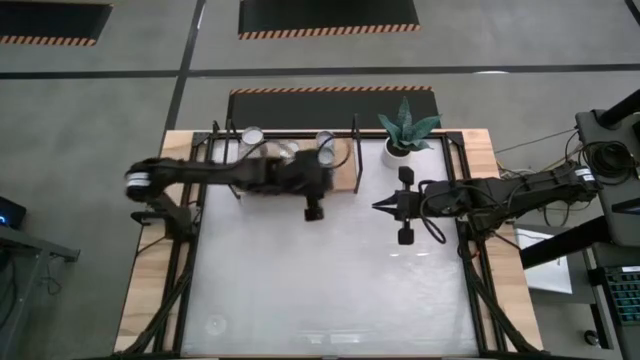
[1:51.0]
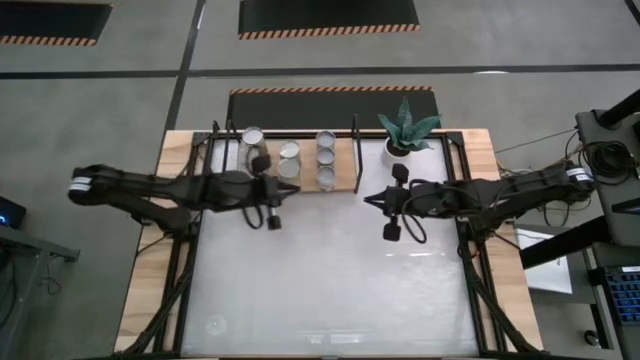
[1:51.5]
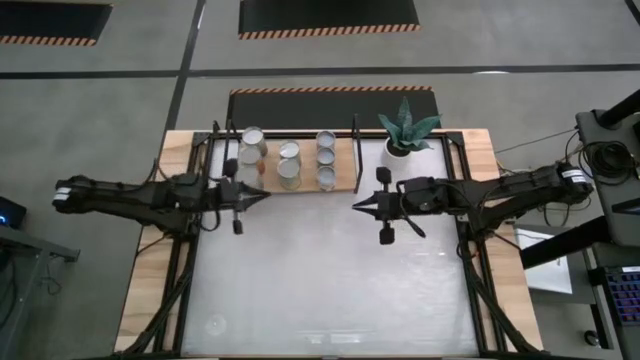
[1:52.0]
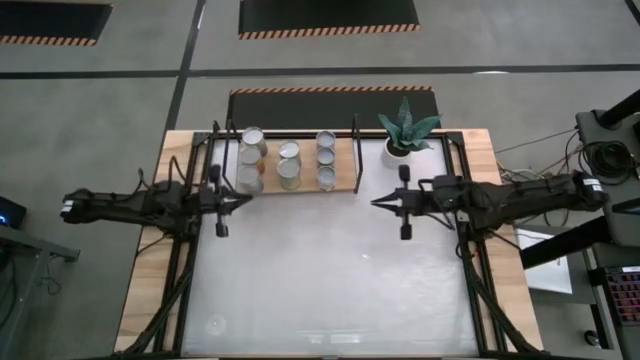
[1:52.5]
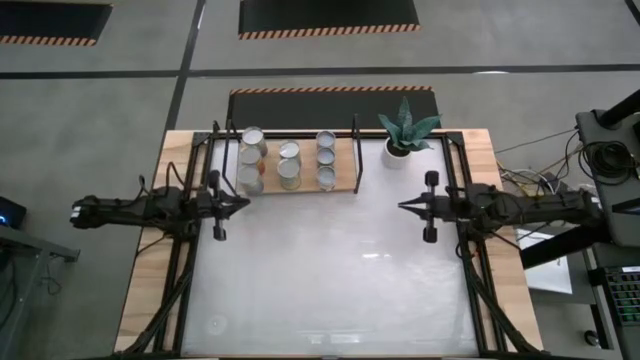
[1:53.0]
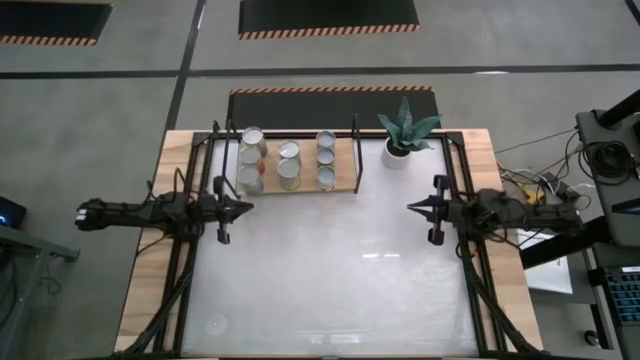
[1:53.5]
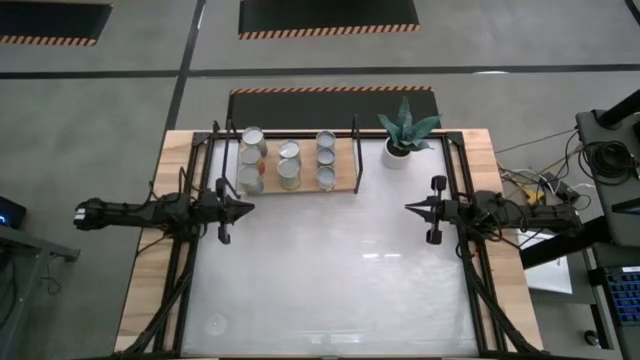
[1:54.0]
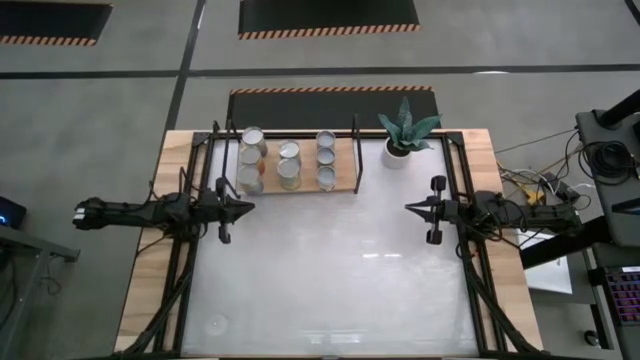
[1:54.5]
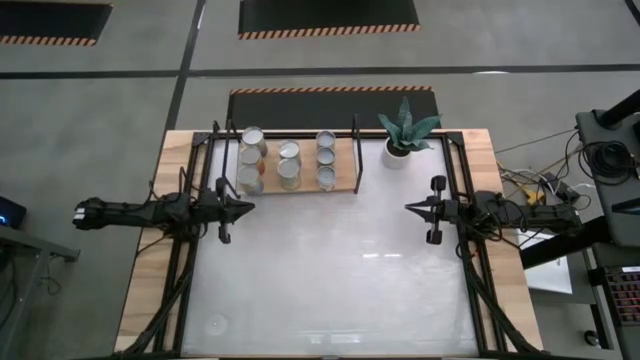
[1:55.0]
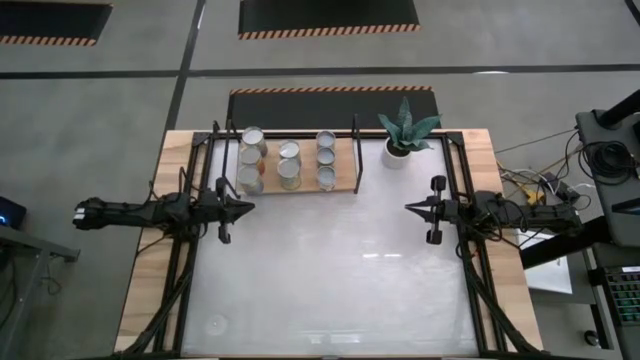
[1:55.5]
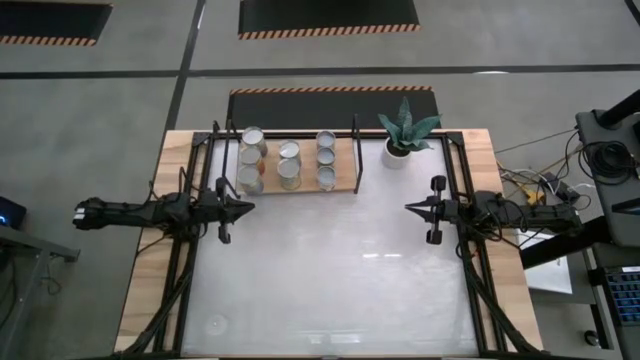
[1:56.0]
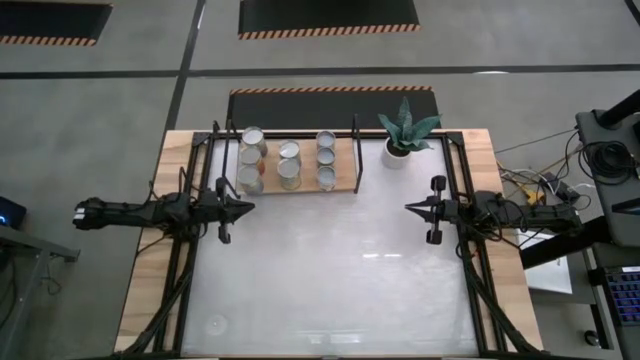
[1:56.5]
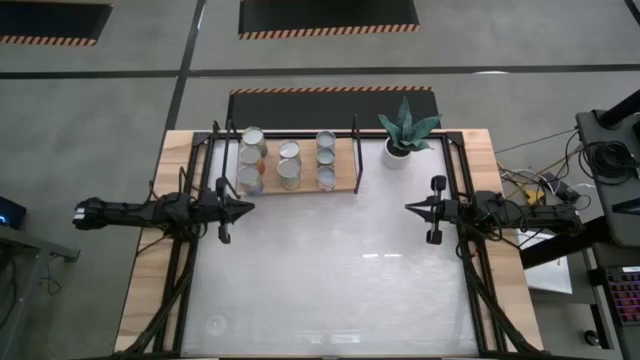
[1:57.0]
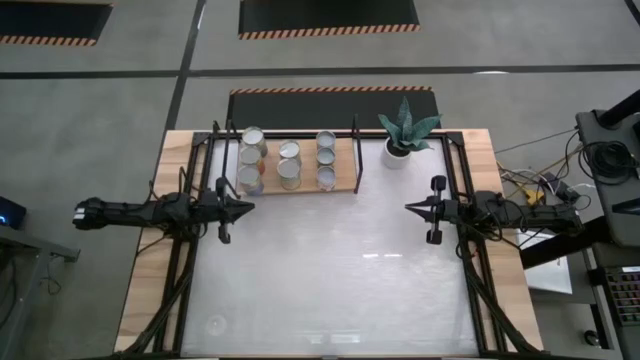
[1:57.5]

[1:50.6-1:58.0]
Task: Pick and place cans onto a shelf
Return to Home Position

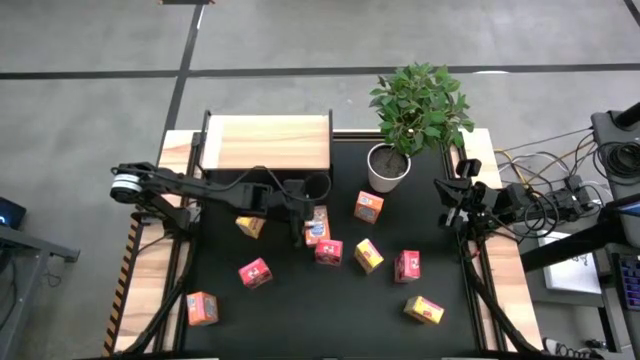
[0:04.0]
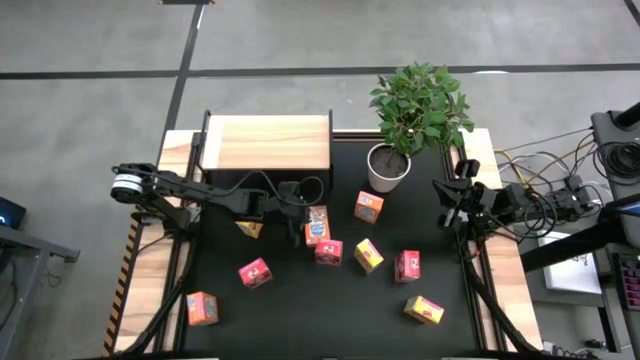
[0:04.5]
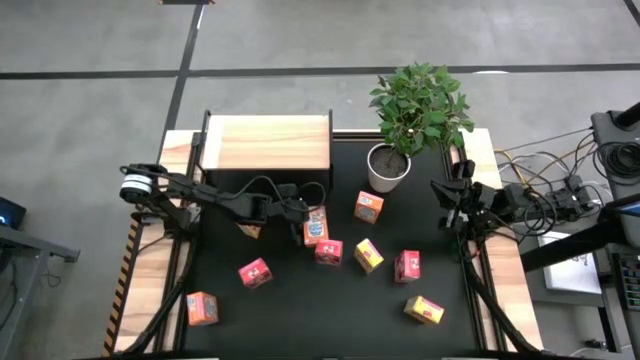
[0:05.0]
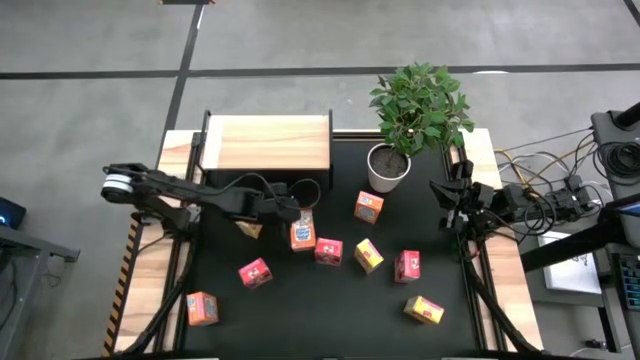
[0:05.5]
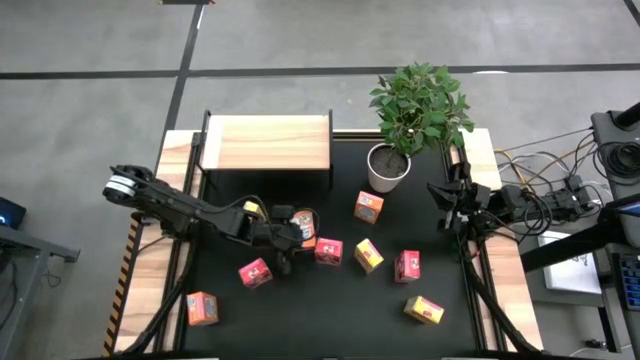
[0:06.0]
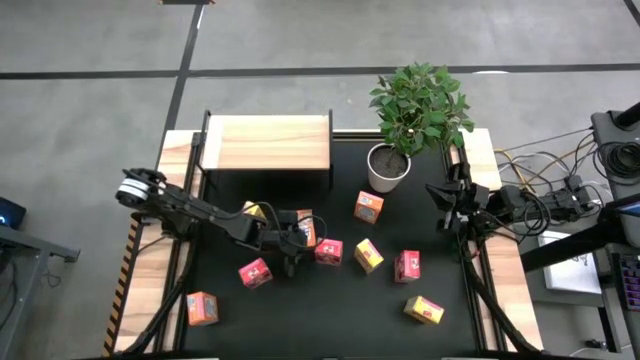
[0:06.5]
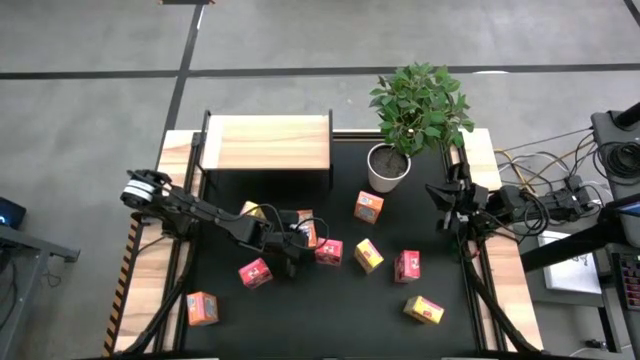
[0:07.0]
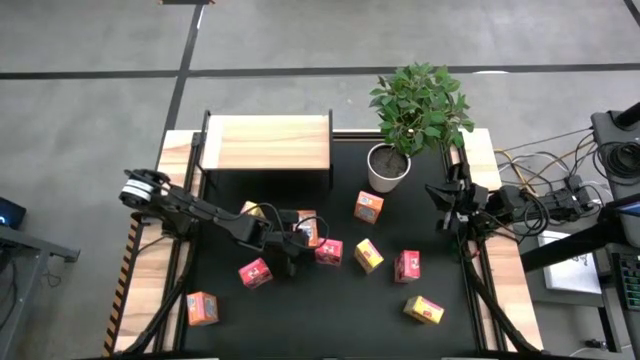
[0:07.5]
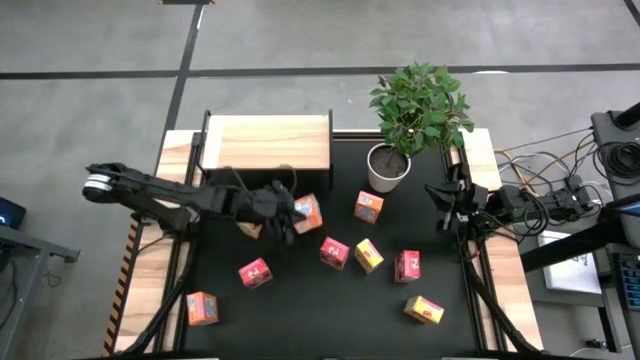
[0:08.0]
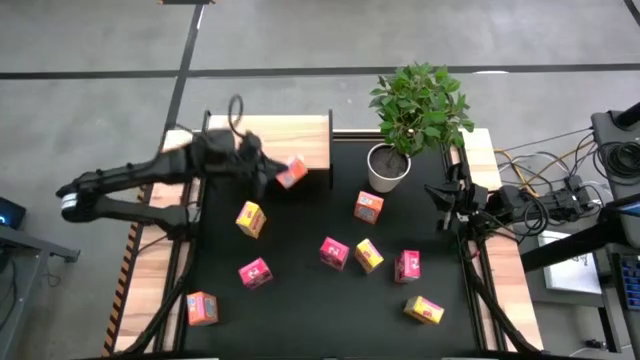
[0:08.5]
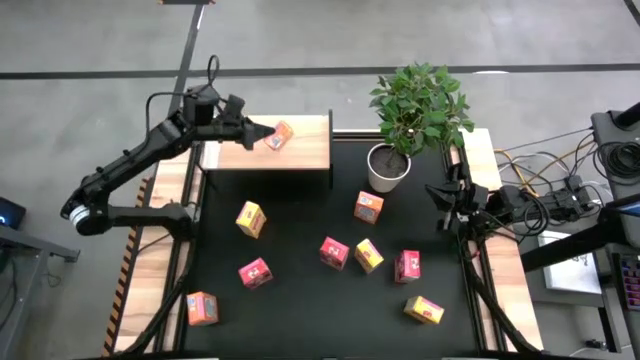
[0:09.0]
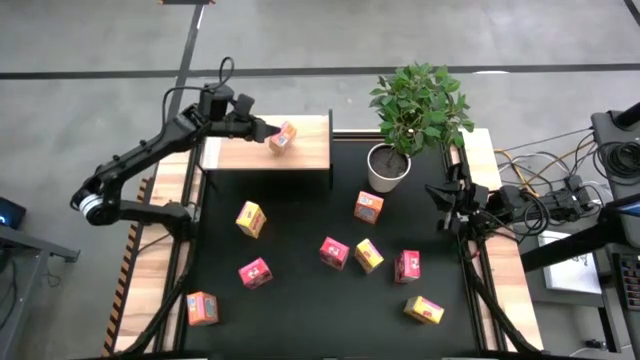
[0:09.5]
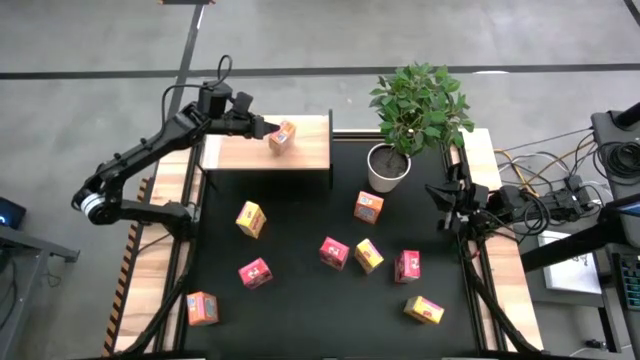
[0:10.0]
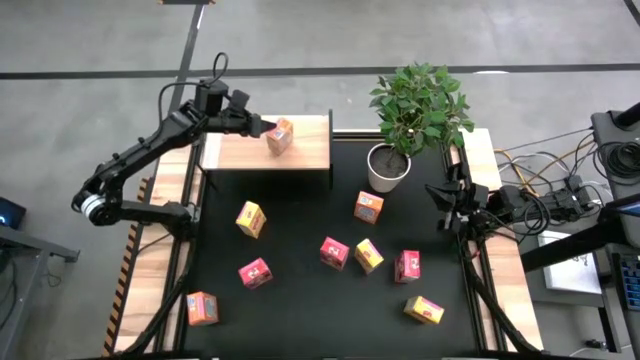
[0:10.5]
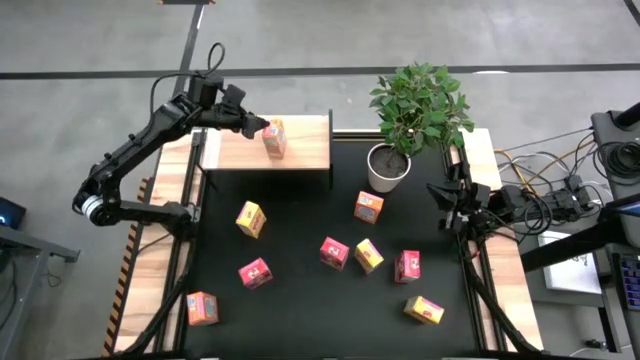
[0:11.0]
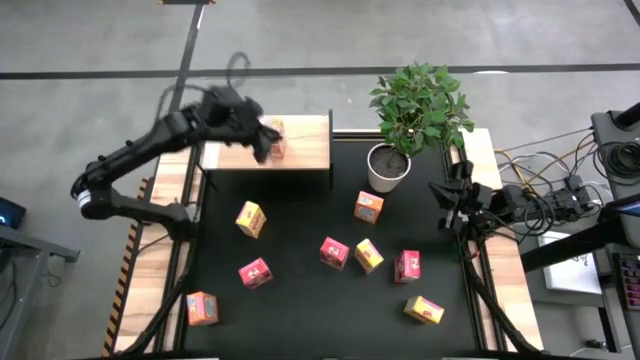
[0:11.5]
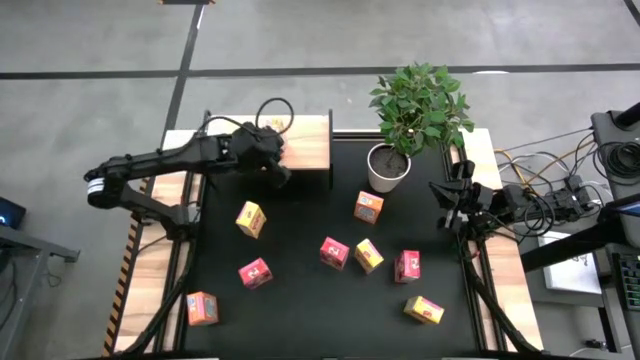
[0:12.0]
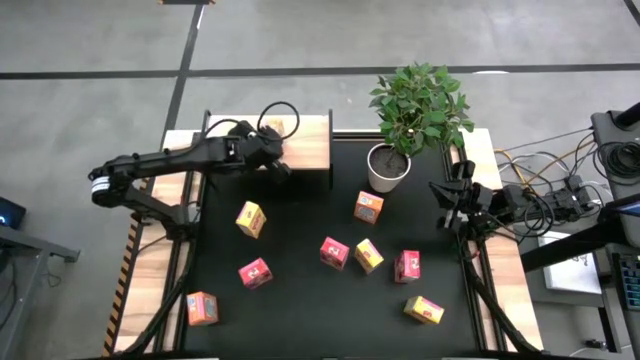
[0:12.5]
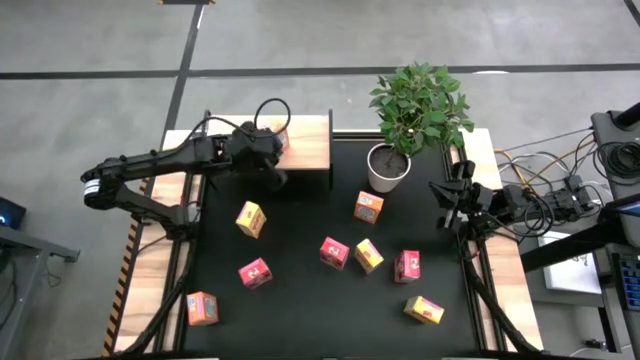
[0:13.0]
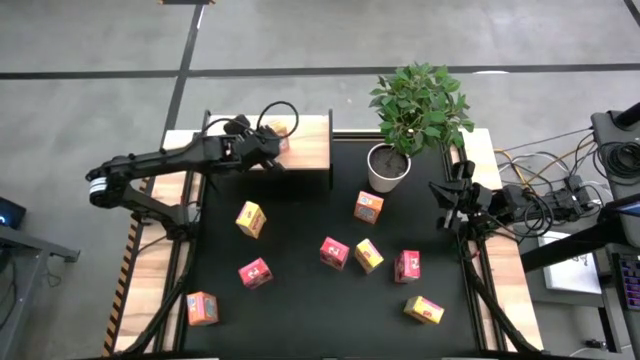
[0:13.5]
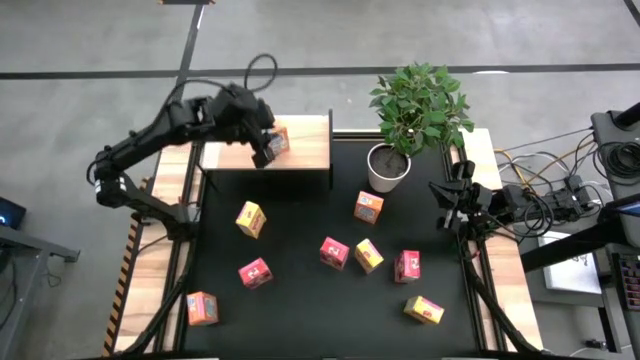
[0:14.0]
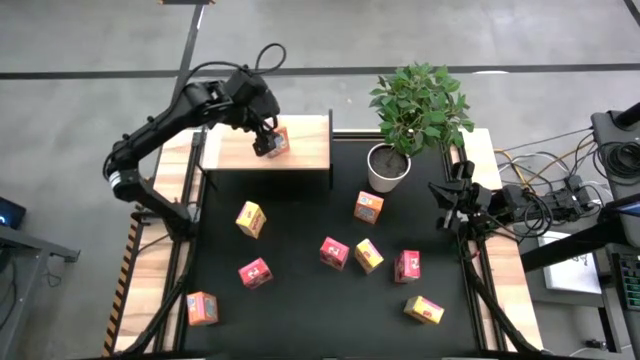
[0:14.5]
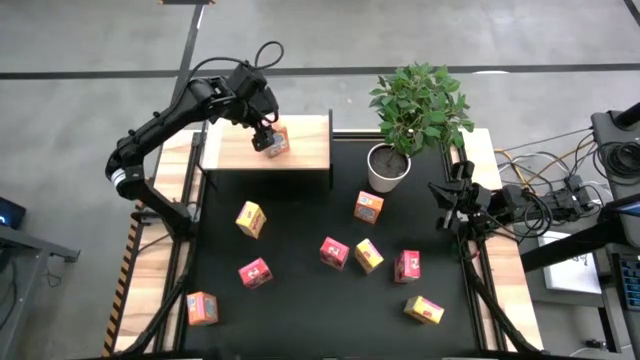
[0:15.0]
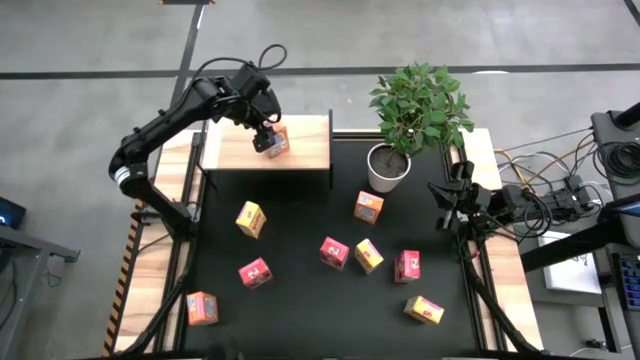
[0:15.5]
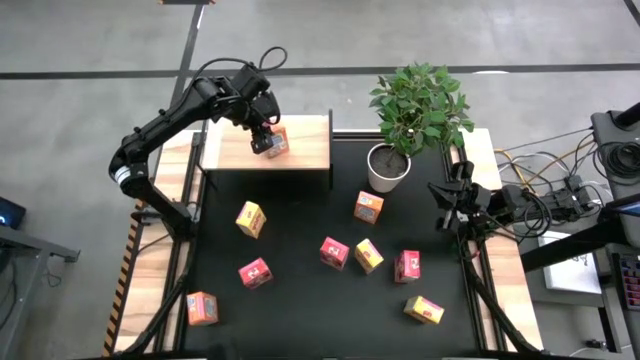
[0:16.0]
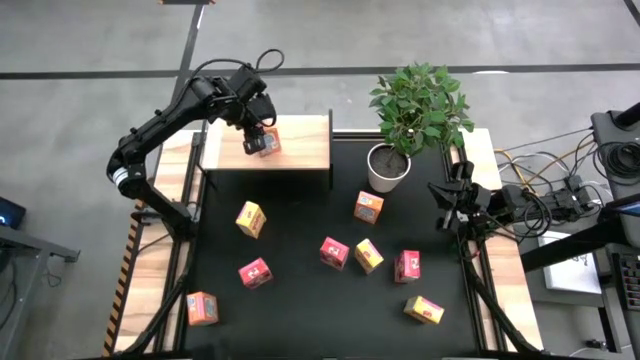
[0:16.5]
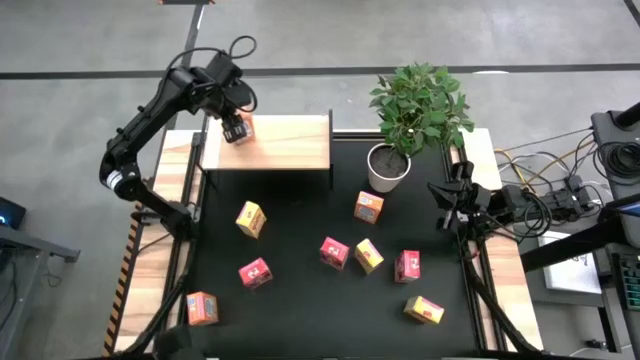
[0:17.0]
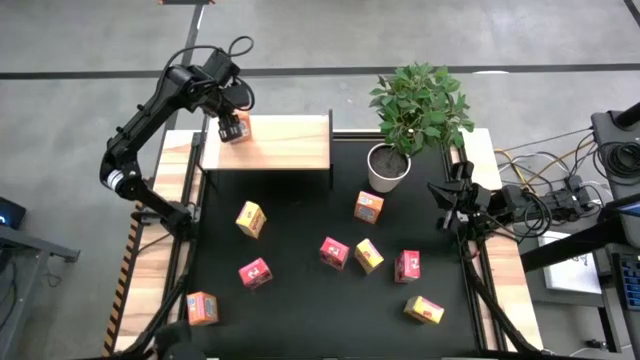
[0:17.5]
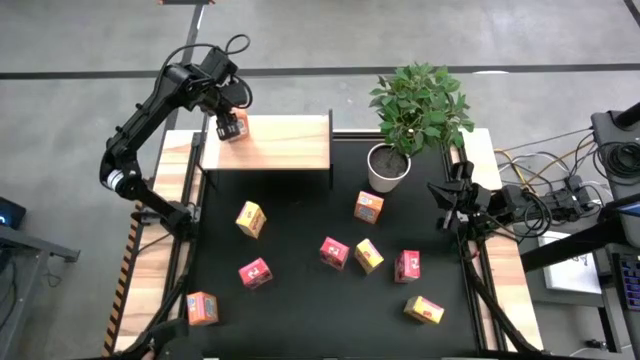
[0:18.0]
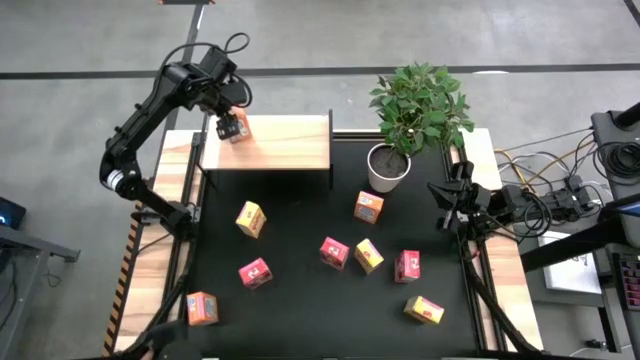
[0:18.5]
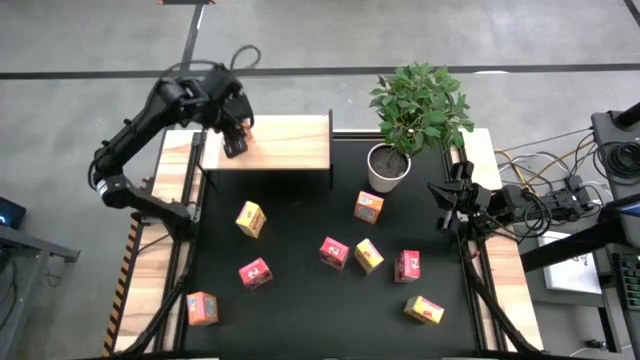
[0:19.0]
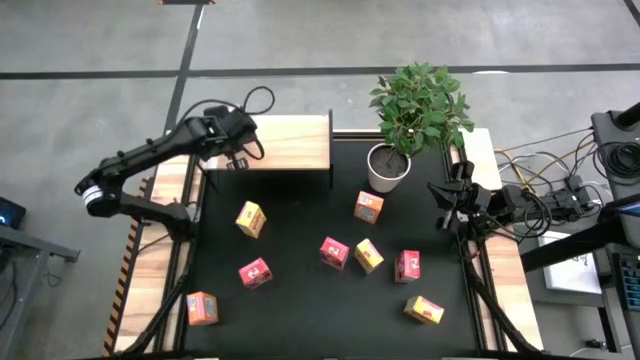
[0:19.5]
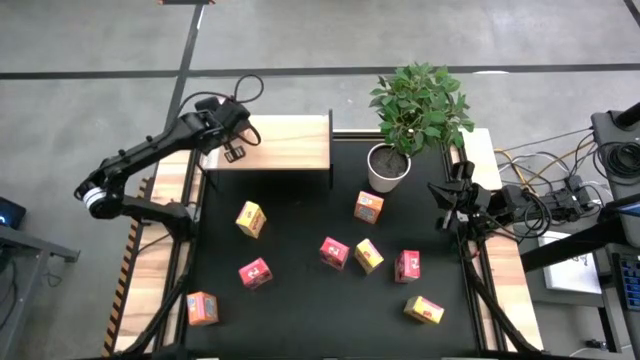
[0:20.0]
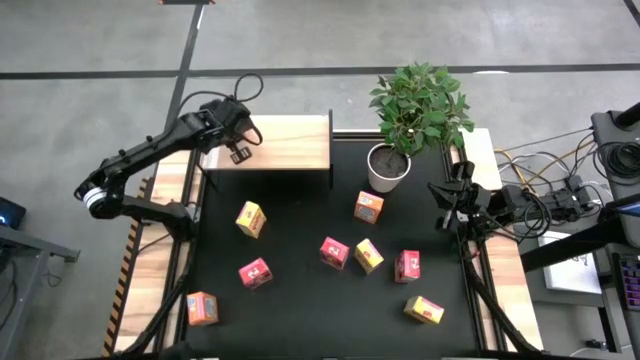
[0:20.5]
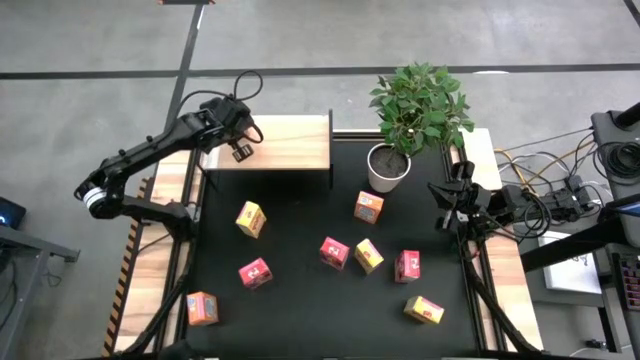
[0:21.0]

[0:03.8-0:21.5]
Task: Stack cereal on shelf
Put the top center orange cereal box on the shelf
